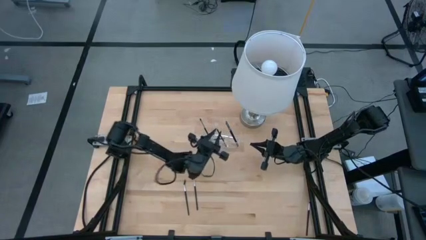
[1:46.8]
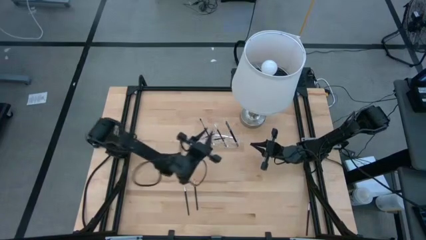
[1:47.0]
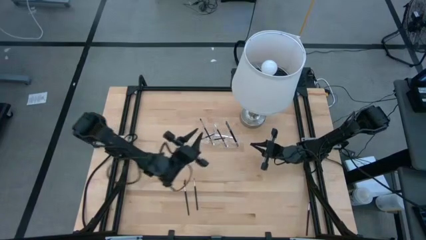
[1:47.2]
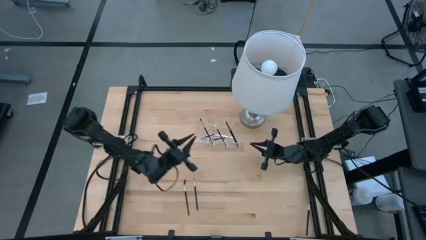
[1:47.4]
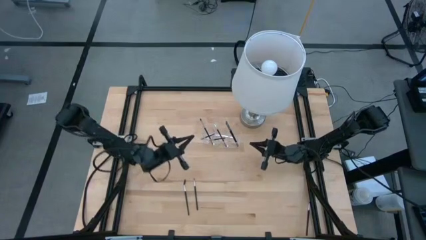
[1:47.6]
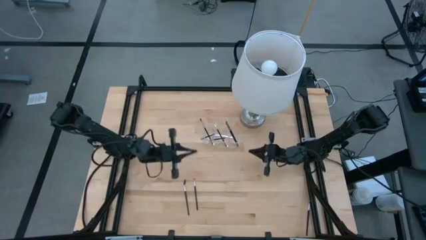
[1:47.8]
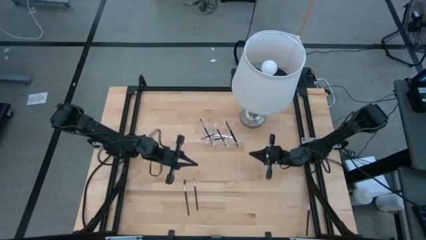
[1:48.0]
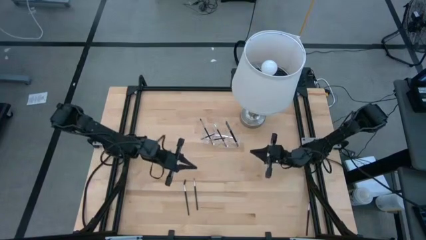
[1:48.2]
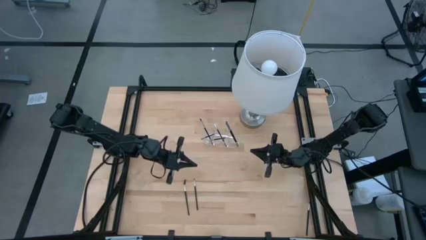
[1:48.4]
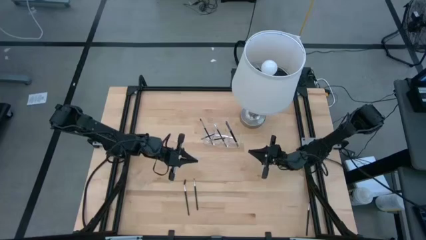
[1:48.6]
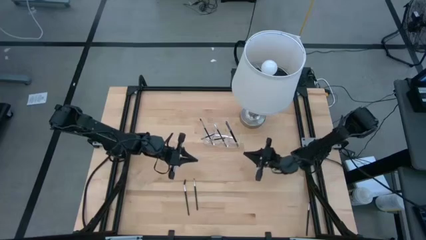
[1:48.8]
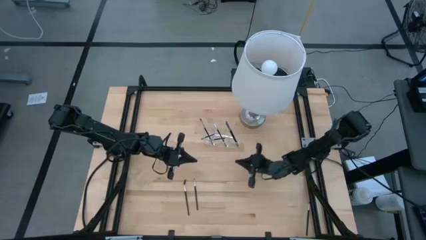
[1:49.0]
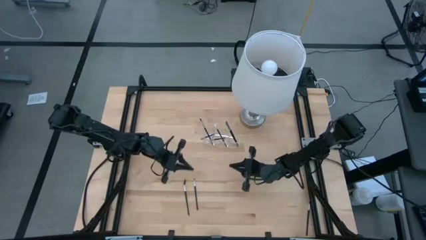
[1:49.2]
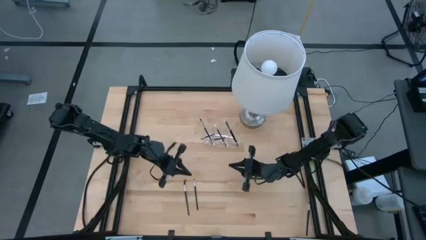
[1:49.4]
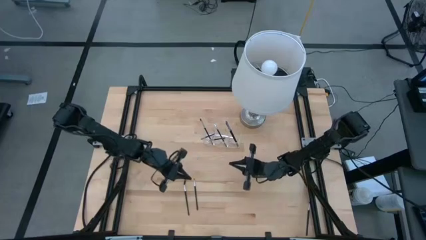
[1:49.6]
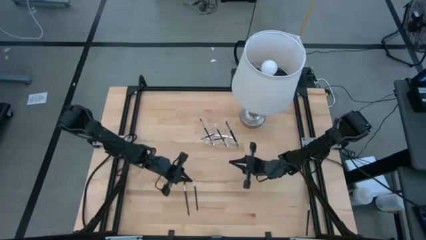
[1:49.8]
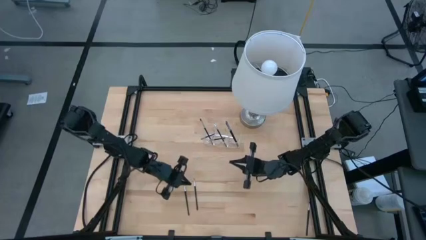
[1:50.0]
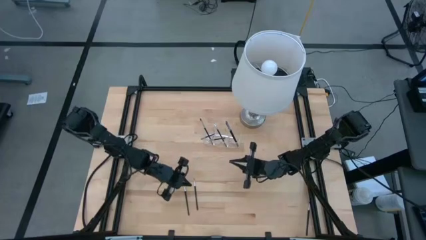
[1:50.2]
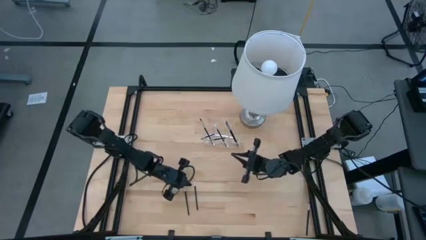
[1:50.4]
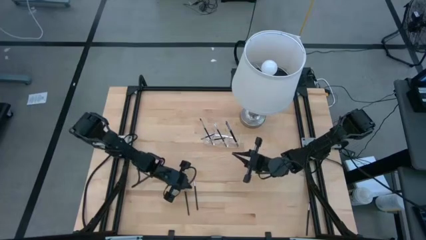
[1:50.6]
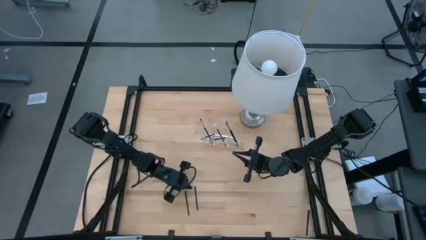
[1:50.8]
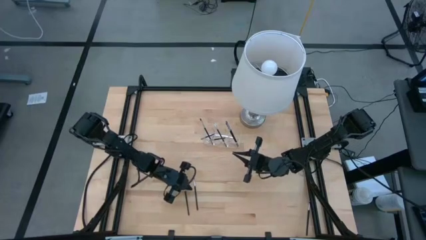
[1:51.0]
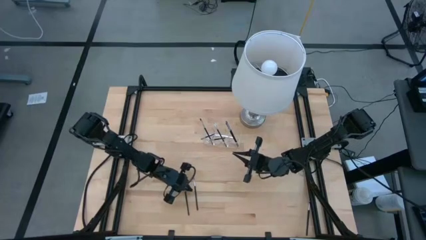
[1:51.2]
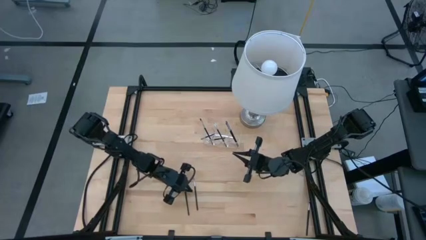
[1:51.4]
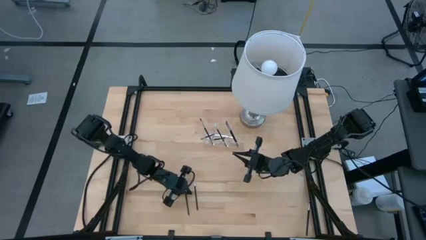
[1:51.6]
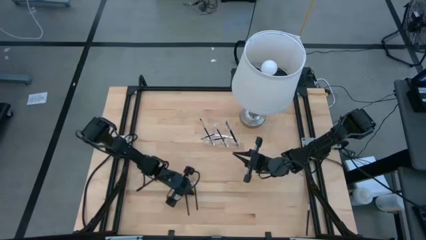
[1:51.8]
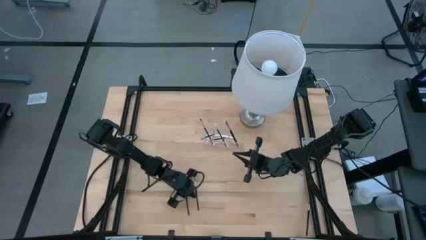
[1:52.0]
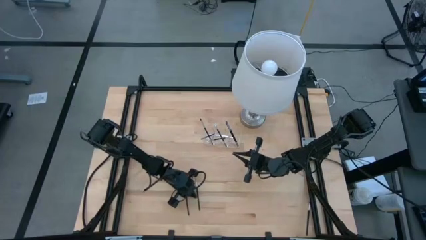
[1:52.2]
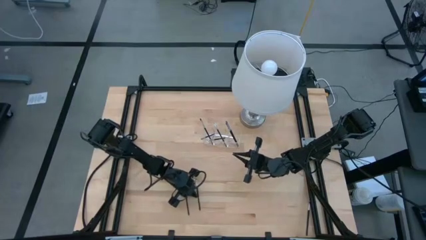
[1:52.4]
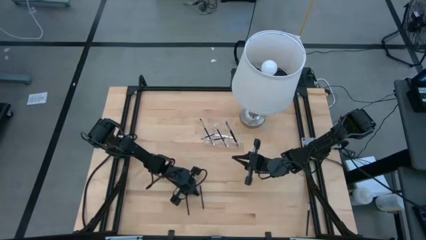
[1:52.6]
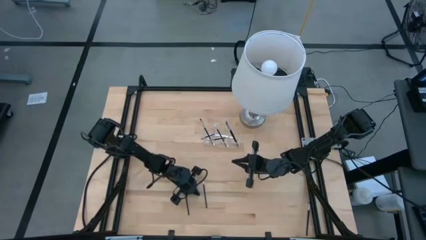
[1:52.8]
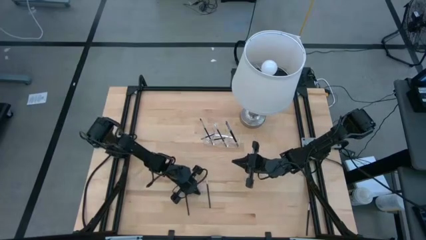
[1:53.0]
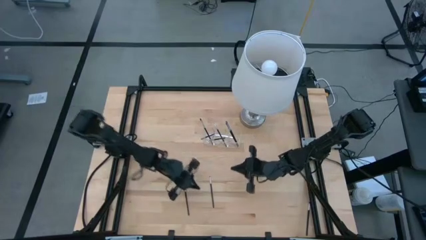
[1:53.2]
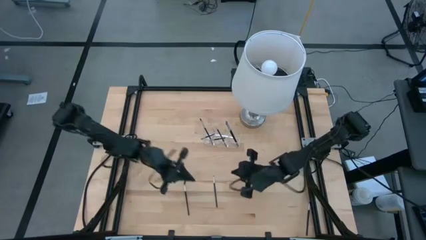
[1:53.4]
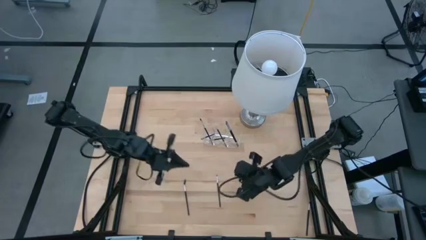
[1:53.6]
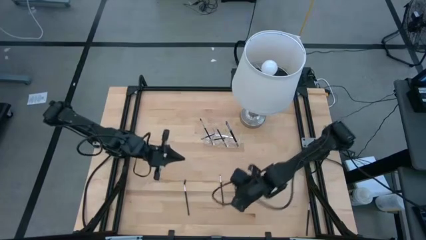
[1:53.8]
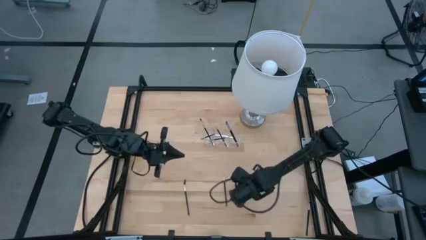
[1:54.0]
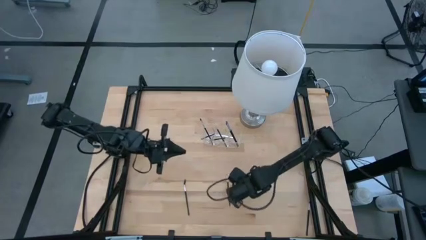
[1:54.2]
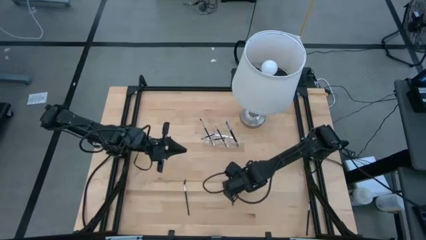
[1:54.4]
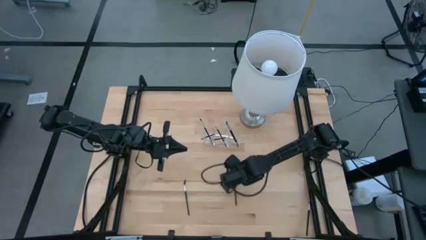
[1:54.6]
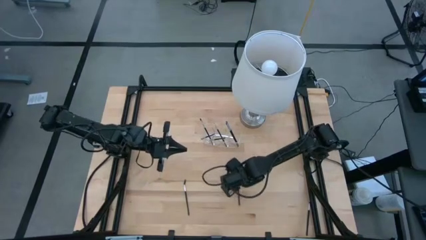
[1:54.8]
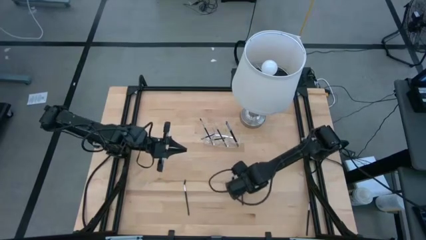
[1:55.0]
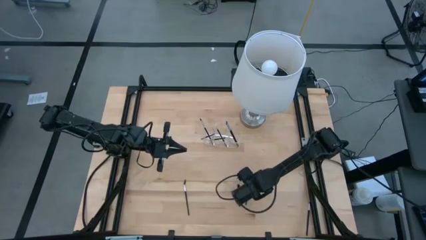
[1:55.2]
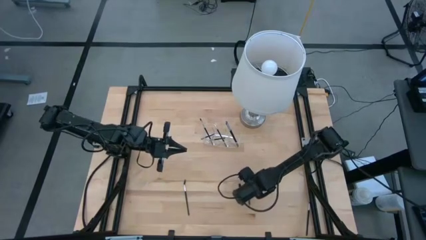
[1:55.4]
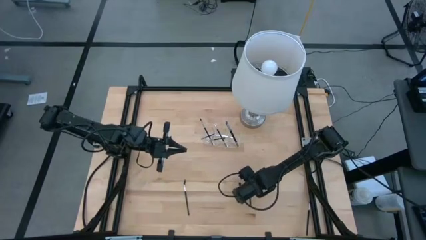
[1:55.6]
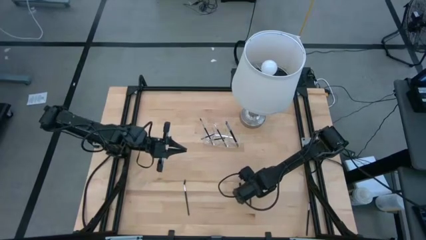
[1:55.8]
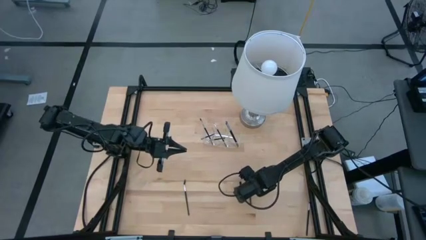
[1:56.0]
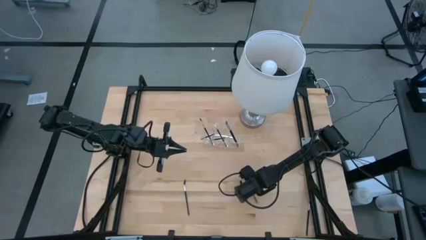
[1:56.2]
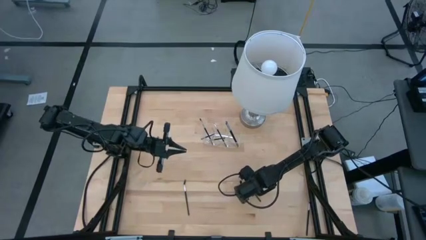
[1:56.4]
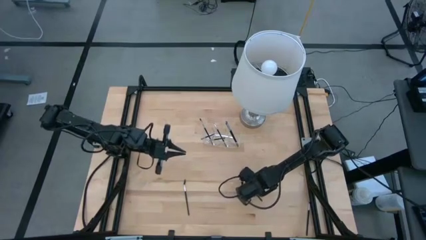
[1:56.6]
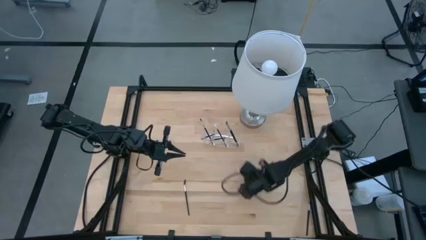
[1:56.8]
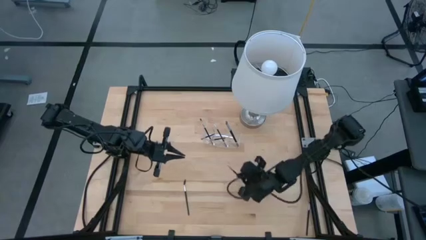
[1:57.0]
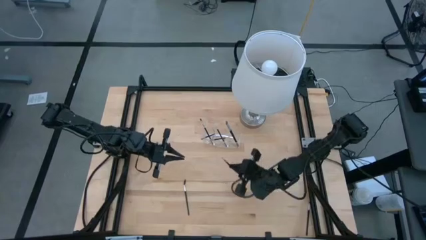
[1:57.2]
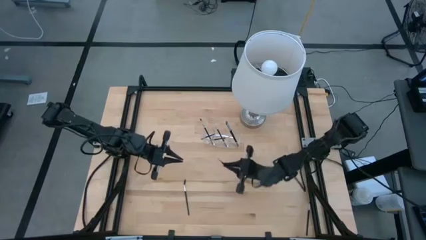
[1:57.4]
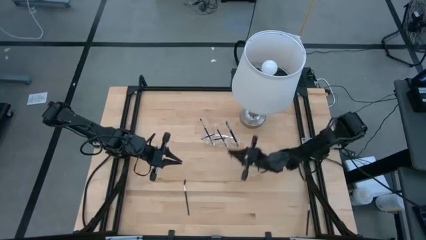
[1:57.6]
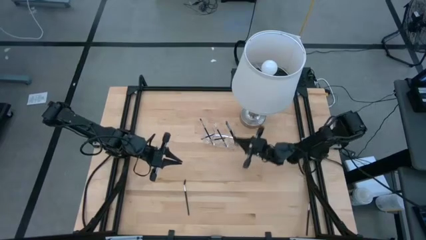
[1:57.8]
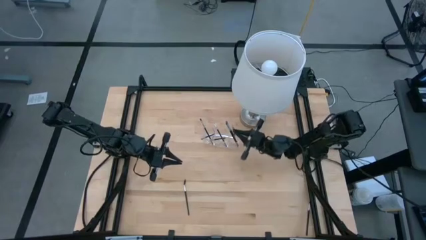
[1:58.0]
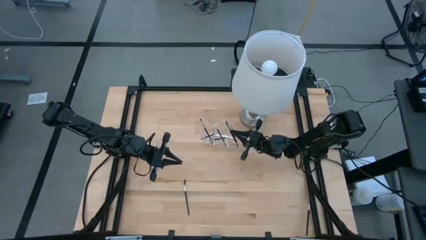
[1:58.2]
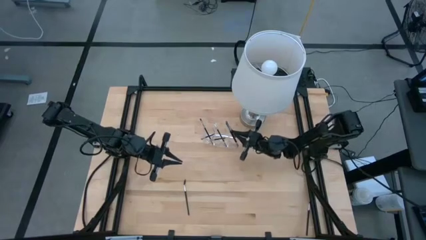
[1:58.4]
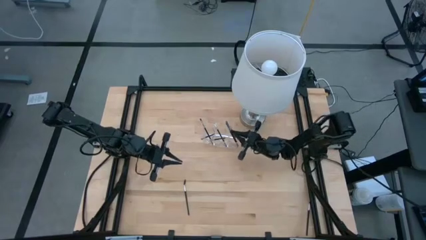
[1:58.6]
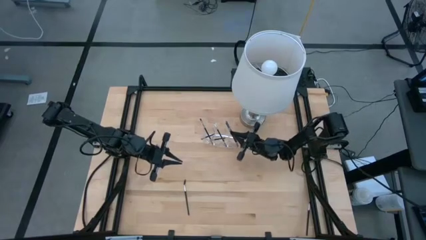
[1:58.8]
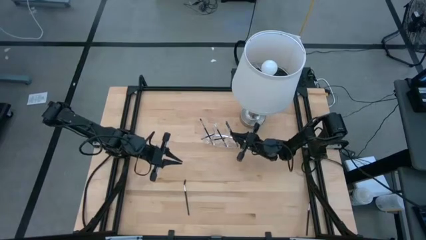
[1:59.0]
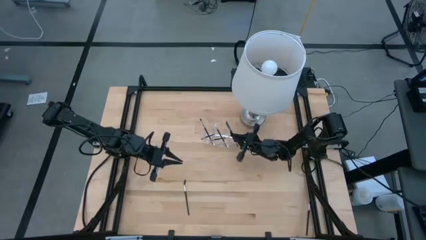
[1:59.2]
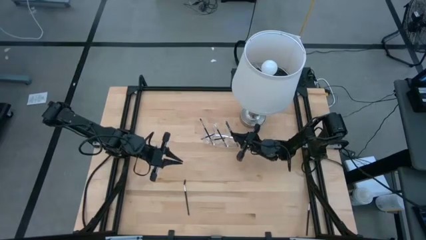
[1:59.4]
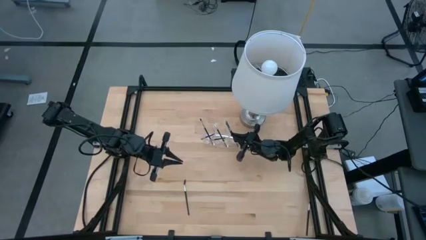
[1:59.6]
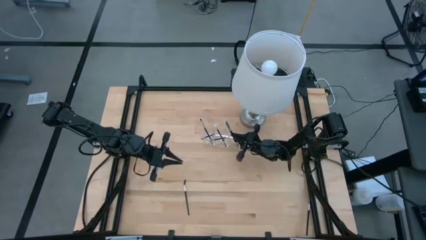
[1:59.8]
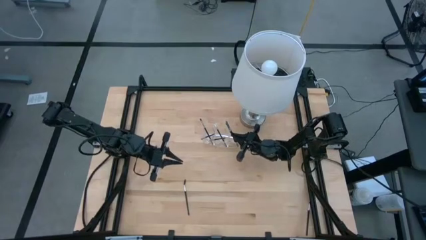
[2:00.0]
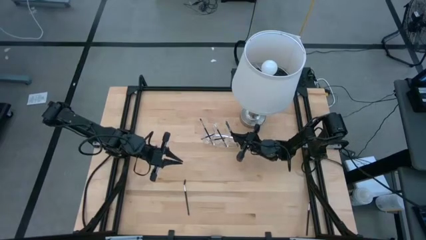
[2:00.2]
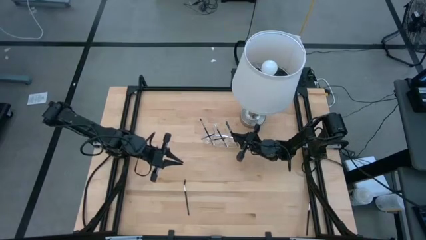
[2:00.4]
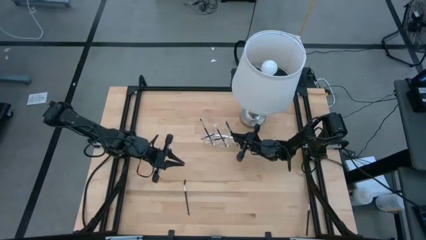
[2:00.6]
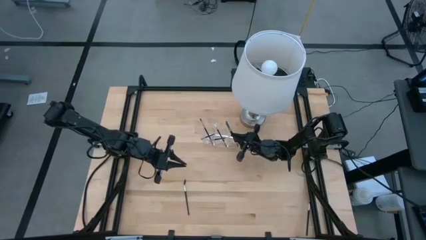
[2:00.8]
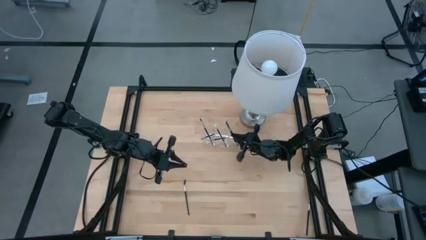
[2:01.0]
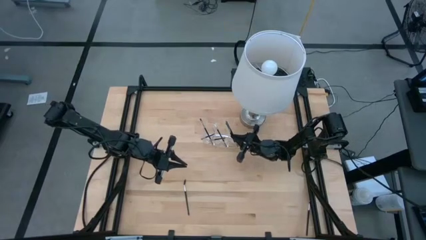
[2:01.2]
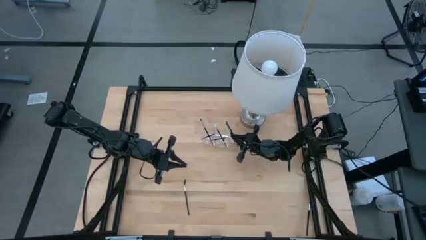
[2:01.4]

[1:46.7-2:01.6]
Task: Pick & Place Makeup Brushes
Put the black liner brush into the transparent organizer
